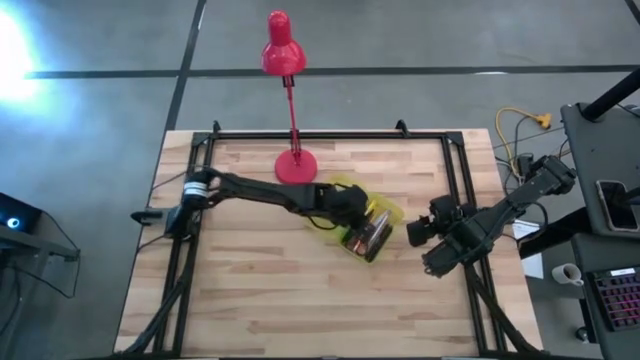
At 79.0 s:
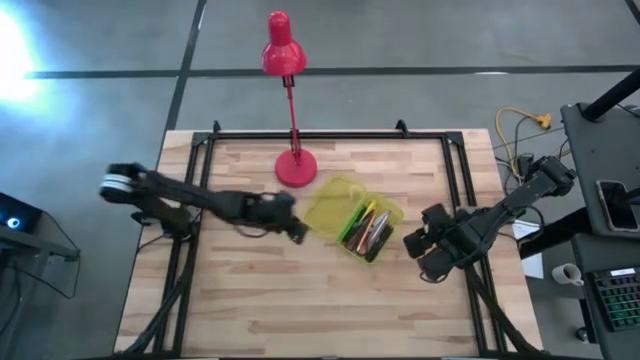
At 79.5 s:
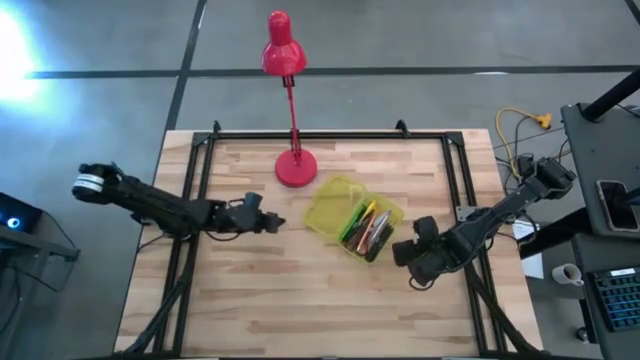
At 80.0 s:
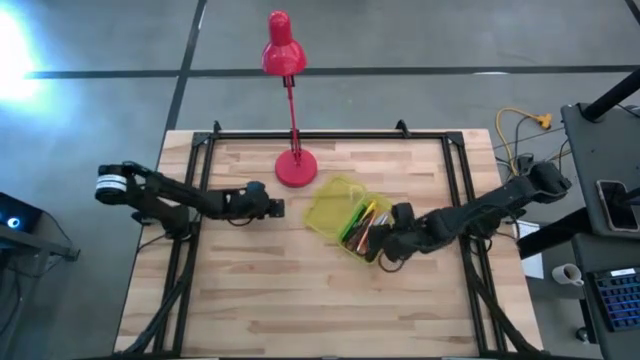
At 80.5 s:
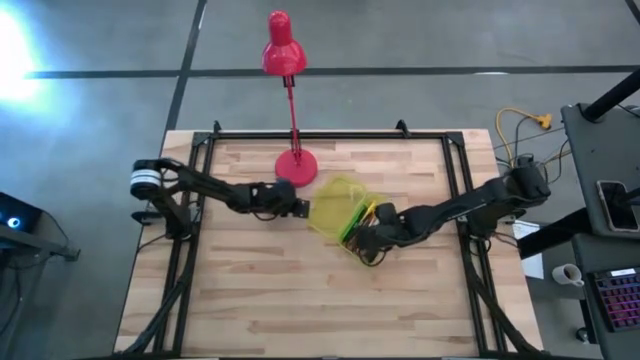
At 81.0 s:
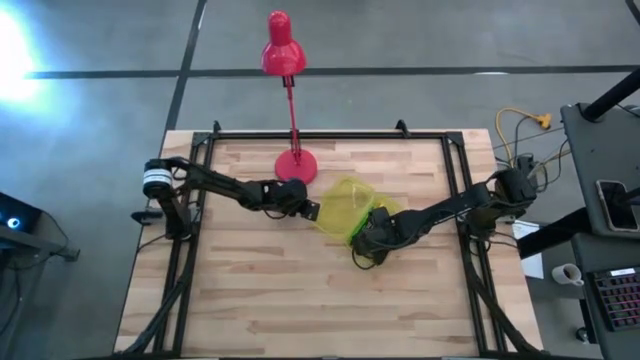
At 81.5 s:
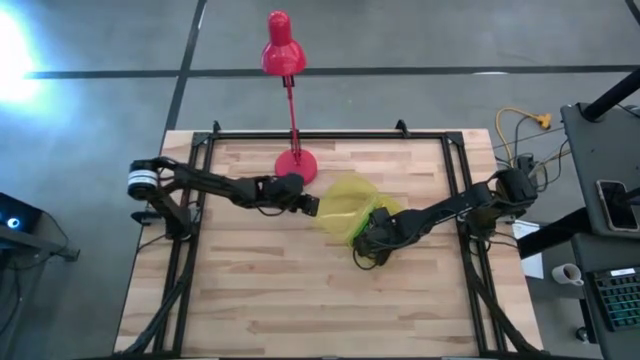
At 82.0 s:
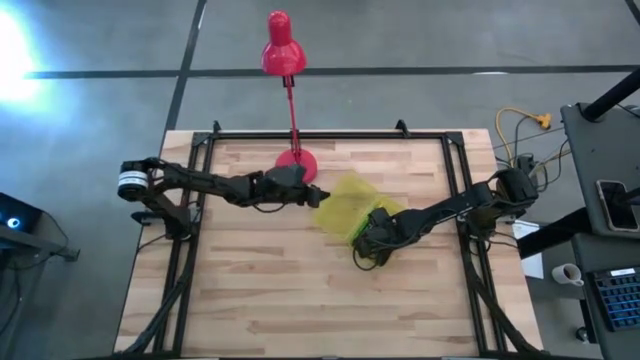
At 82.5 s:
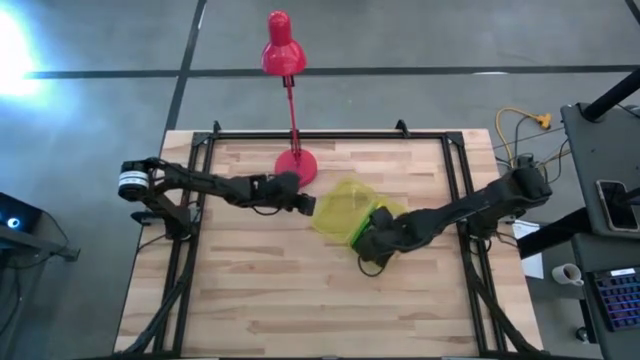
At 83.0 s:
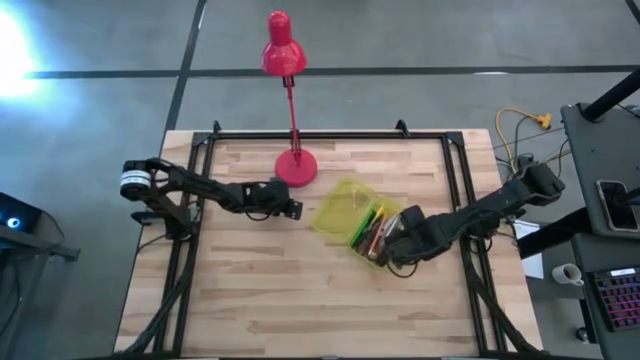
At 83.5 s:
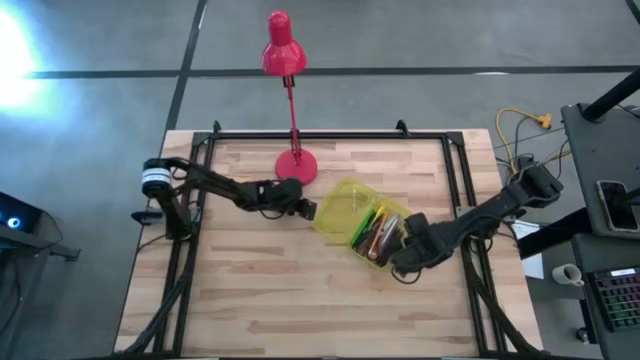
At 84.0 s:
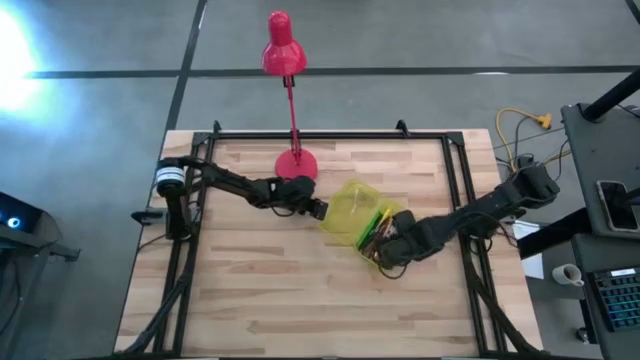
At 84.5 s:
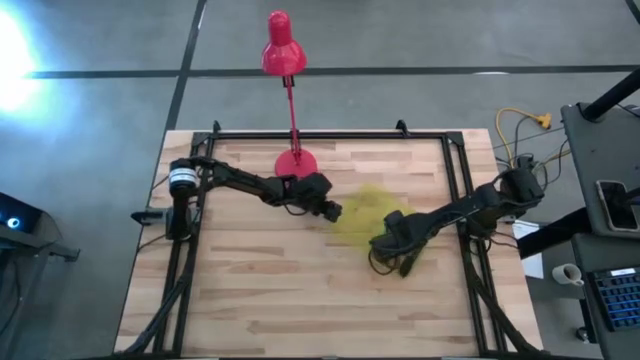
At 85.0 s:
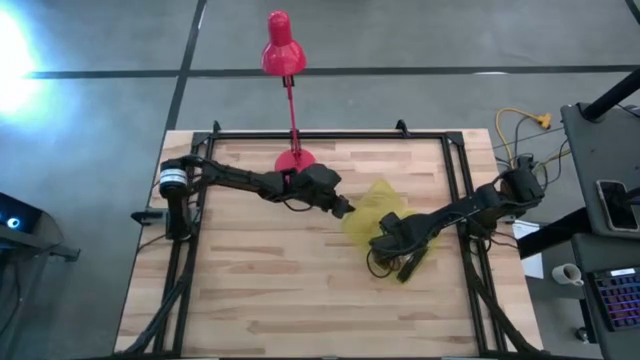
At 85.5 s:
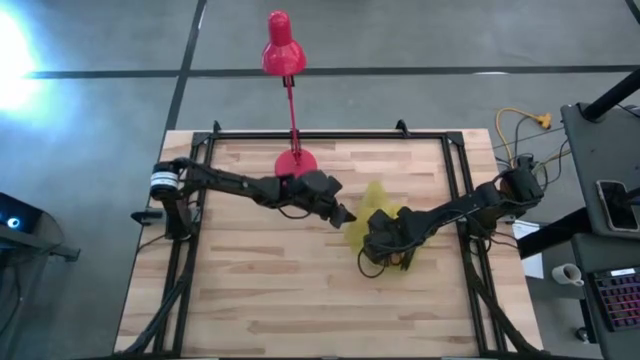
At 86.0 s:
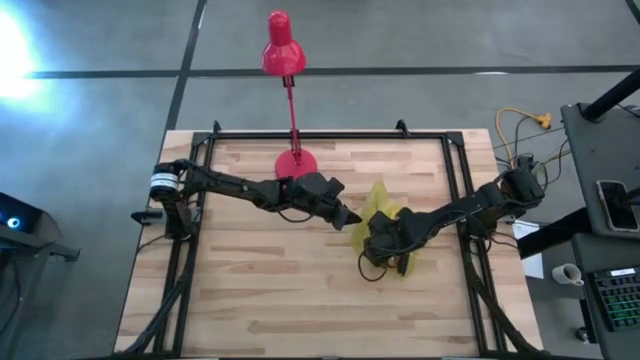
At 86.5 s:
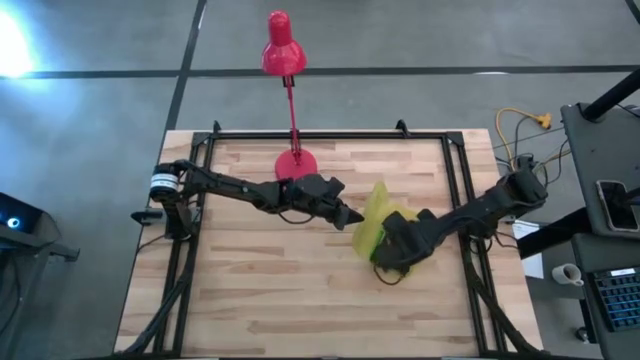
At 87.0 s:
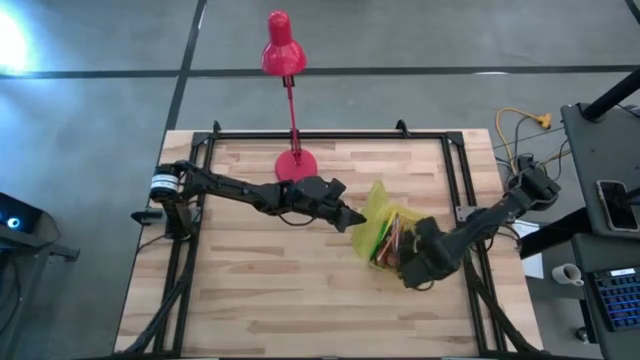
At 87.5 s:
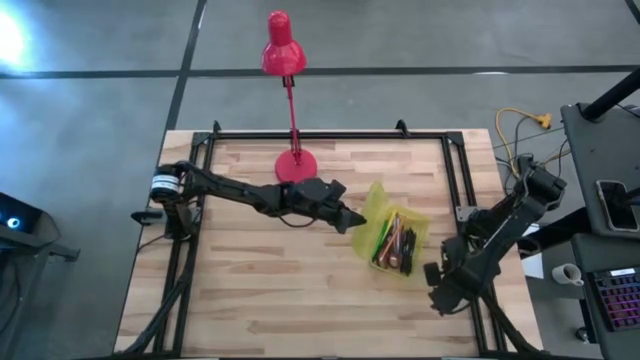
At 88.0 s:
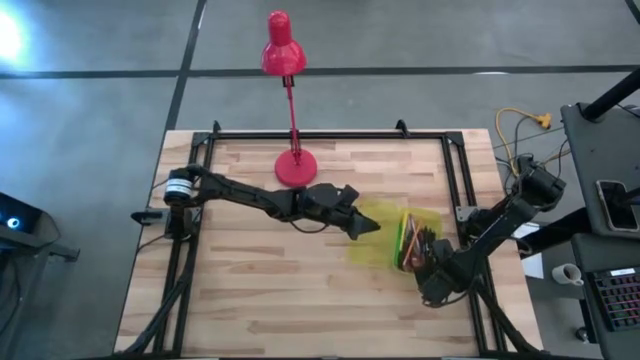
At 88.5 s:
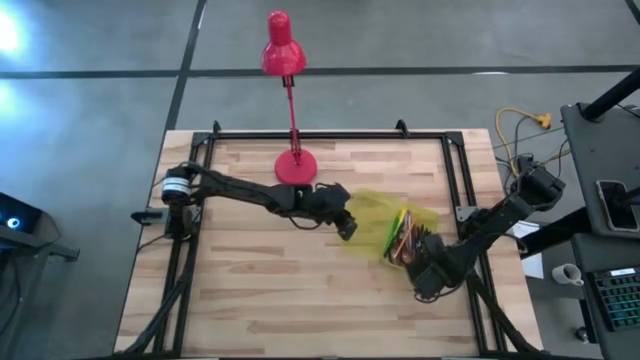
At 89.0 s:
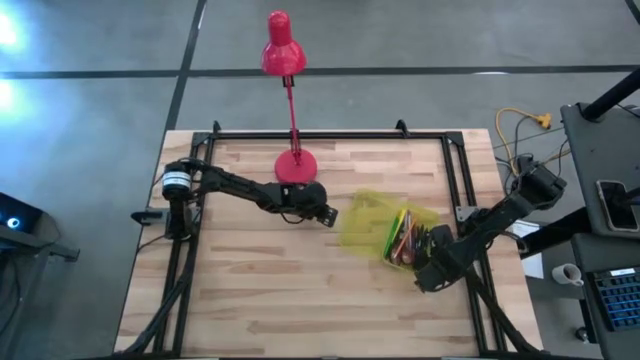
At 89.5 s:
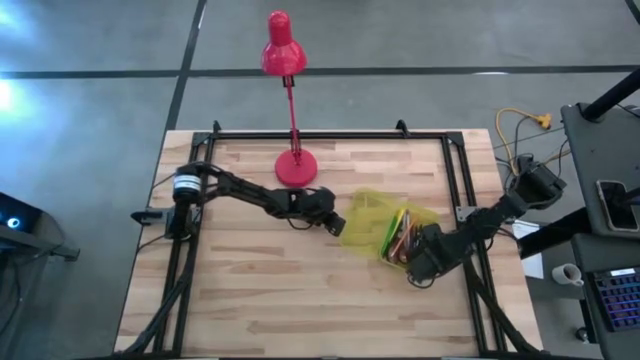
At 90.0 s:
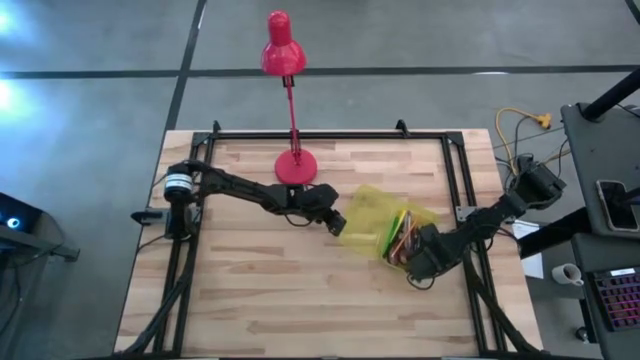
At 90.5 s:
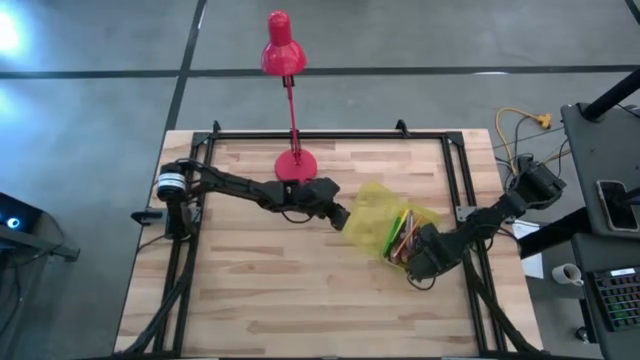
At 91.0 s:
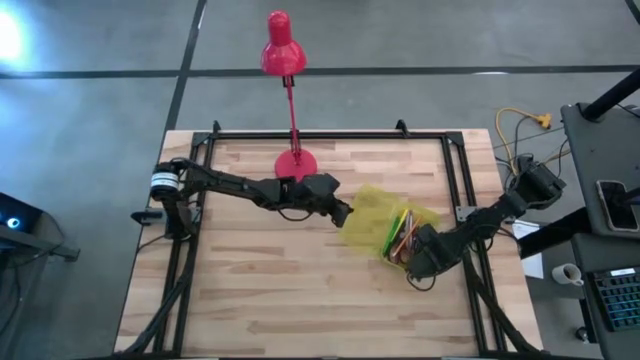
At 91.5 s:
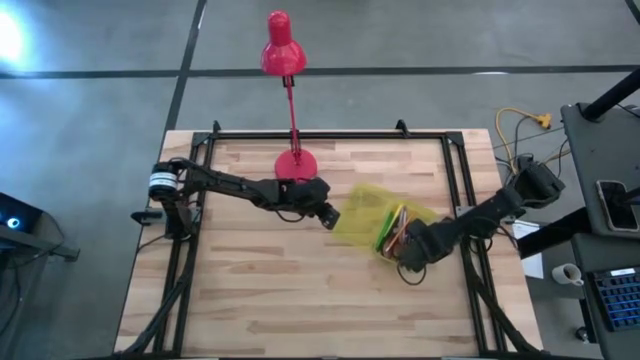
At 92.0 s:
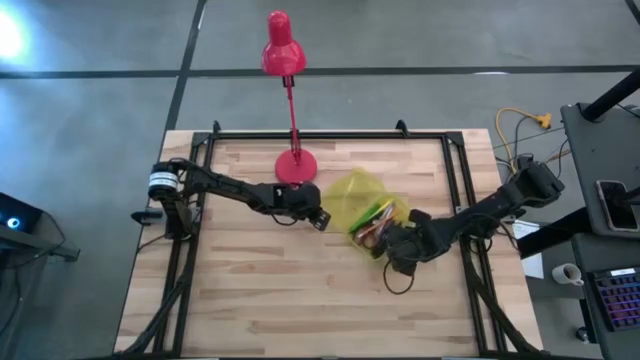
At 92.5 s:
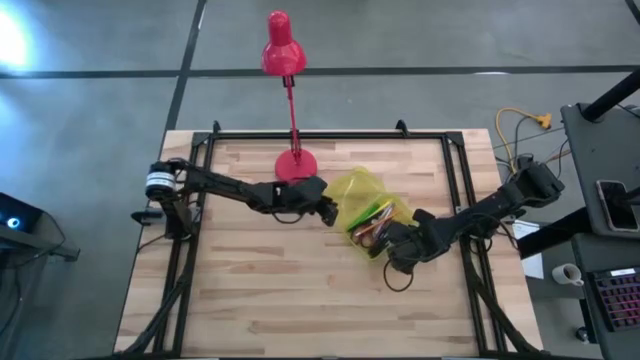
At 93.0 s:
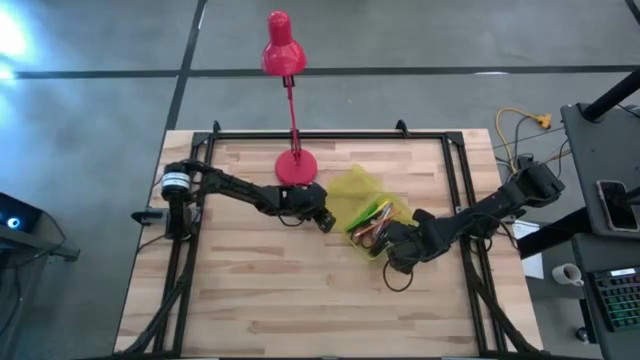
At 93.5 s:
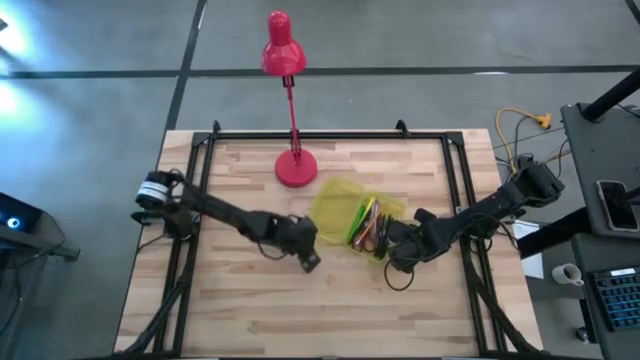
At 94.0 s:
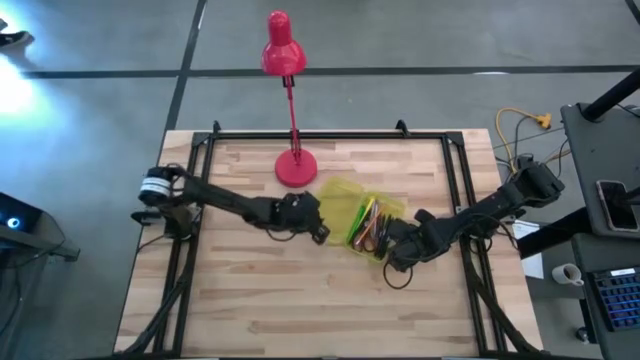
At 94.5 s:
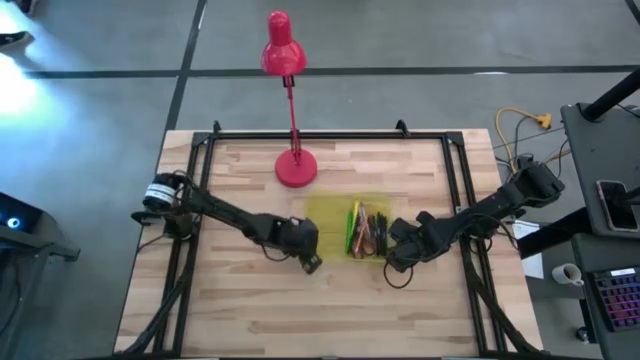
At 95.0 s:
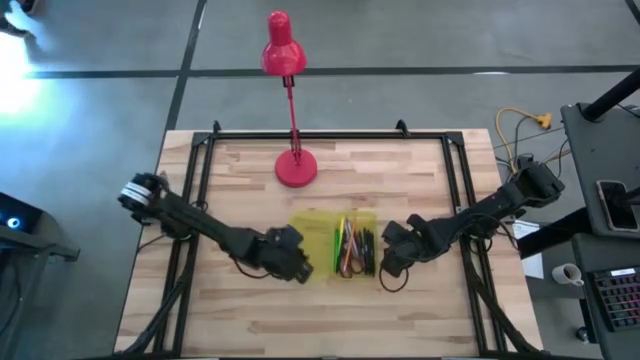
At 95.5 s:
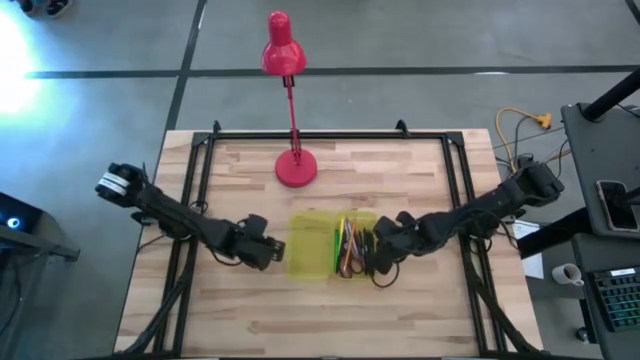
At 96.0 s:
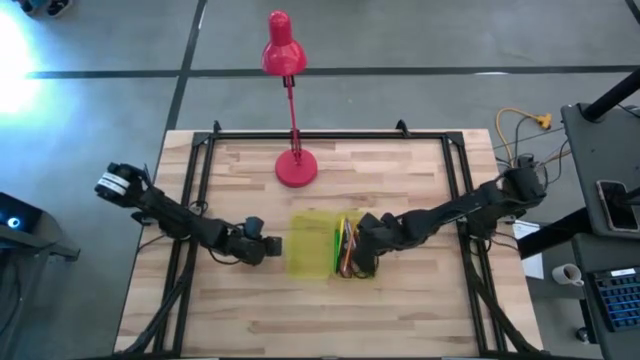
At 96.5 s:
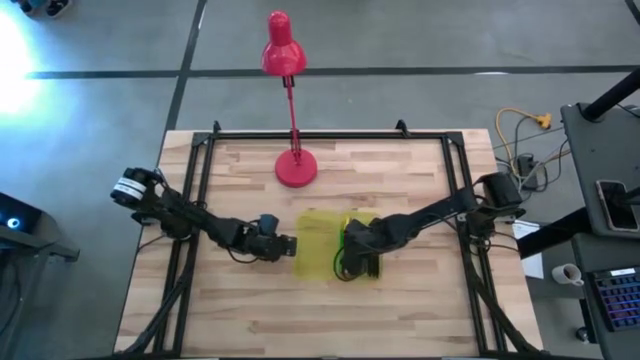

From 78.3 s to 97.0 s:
Task: Pick & place school supplies into a supply box
Close the yellow supply box

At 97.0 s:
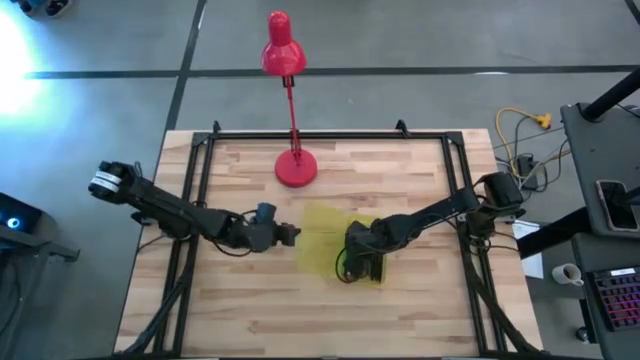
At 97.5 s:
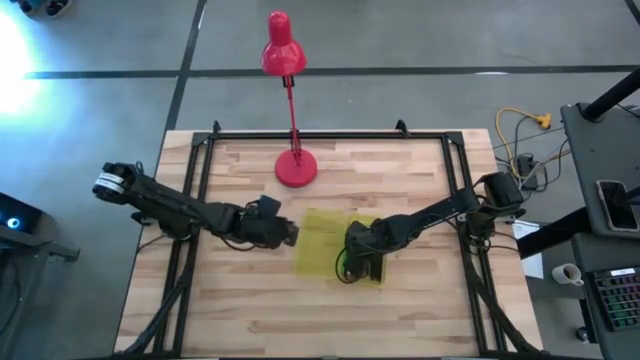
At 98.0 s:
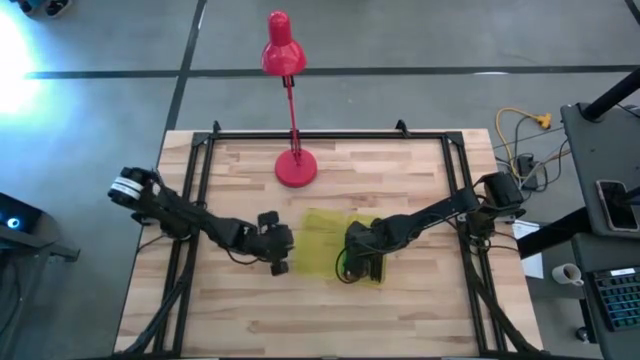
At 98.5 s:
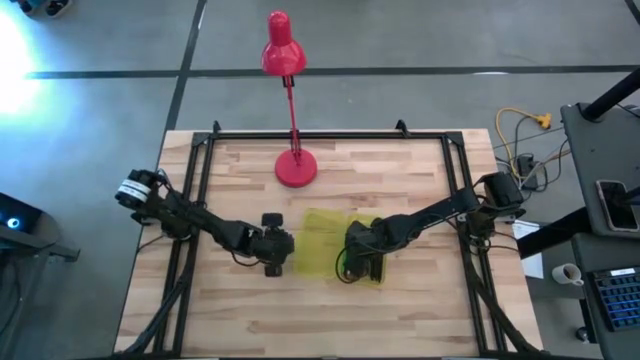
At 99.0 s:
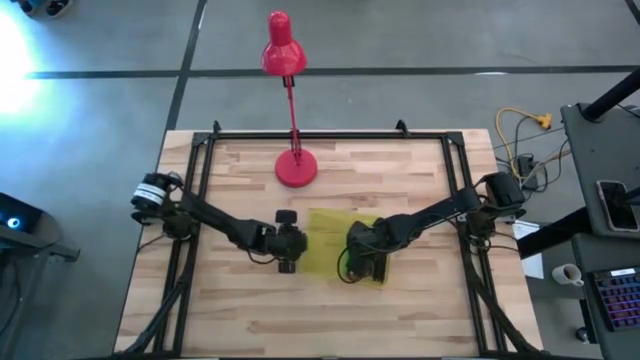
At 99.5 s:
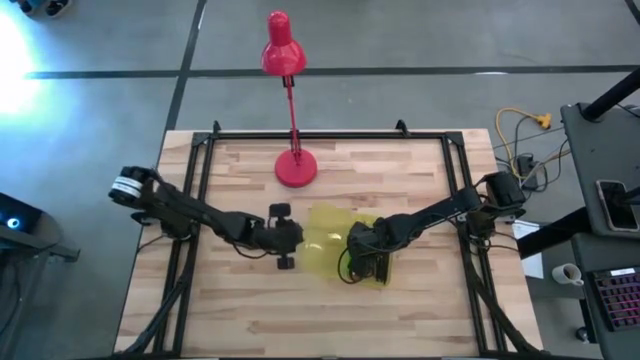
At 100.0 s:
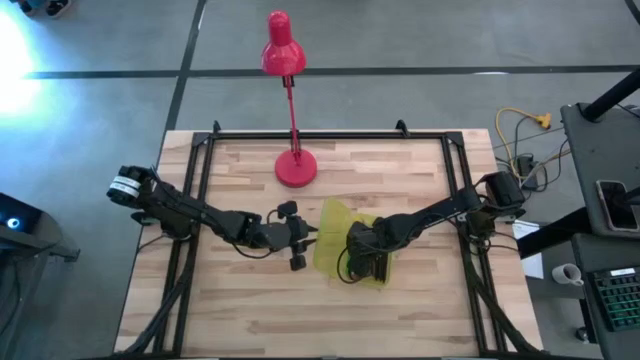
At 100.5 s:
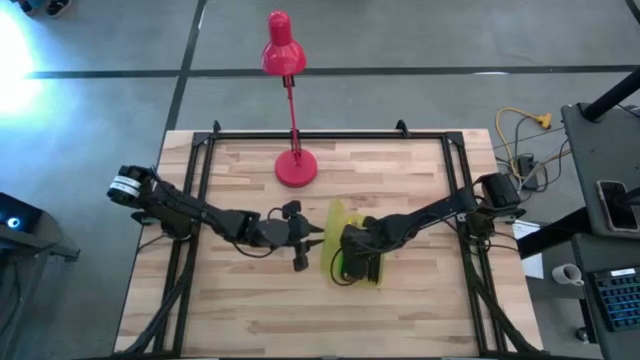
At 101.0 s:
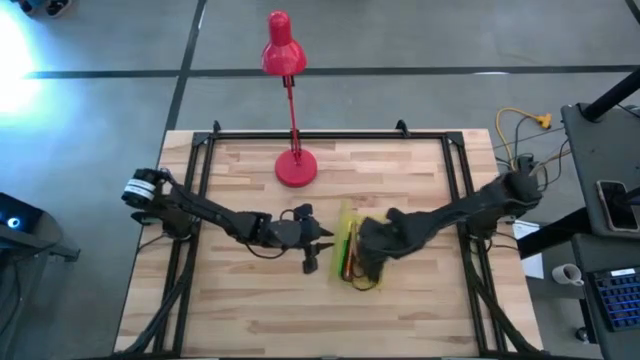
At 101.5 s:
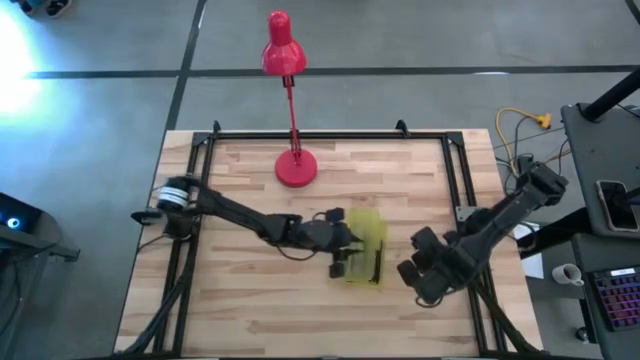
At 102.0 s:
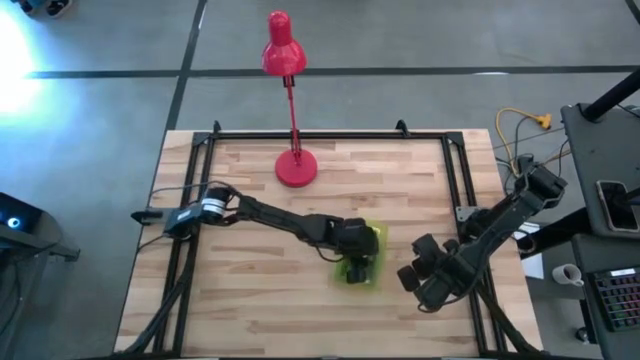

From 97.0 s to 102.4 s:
Close the yellow supply box
